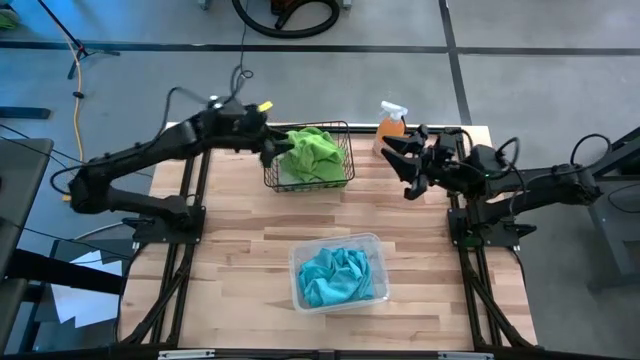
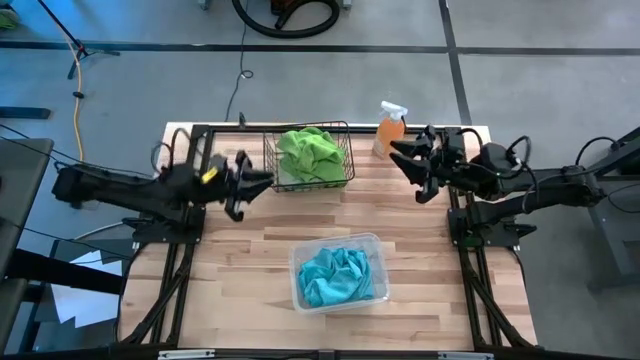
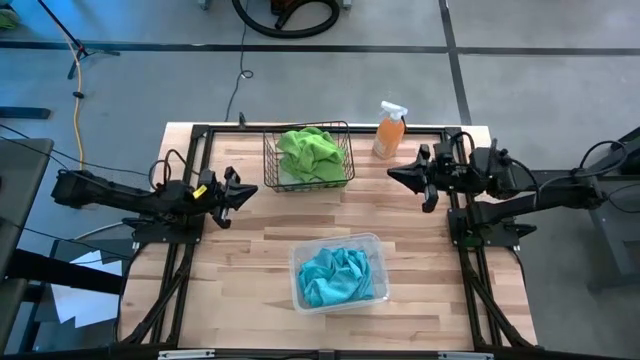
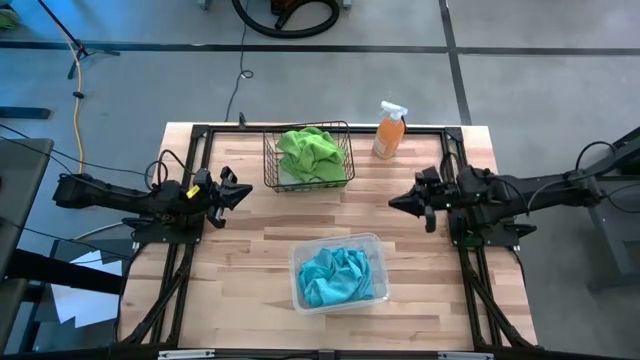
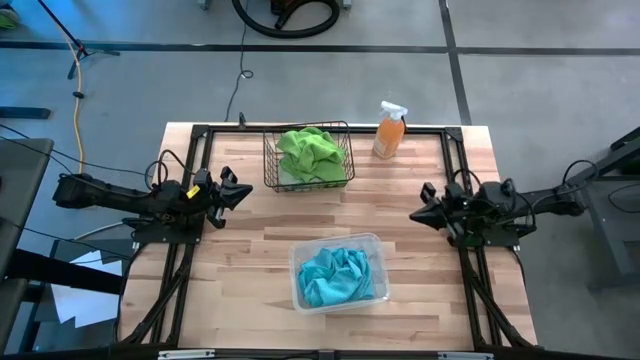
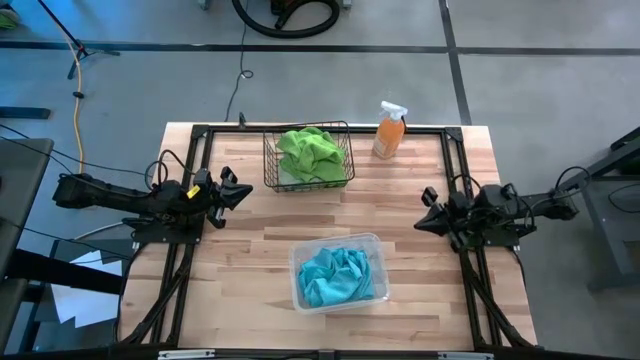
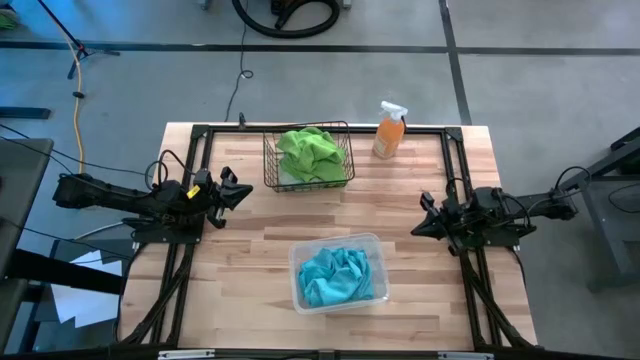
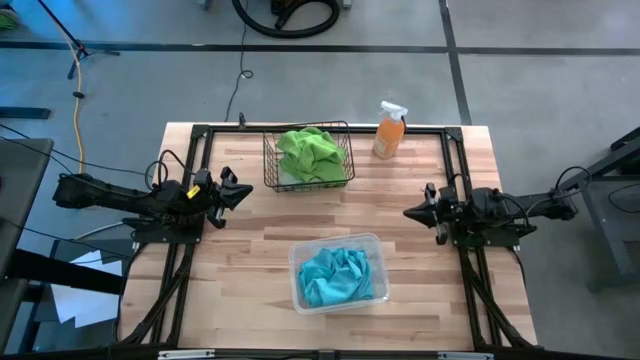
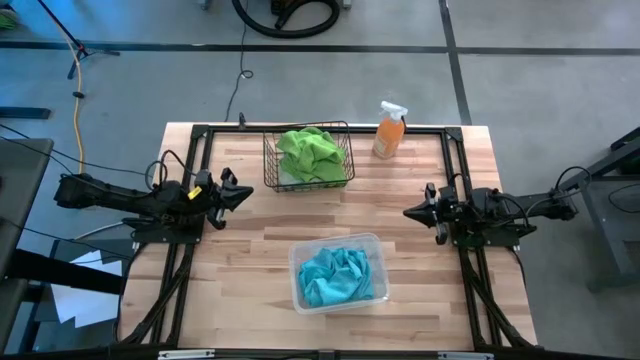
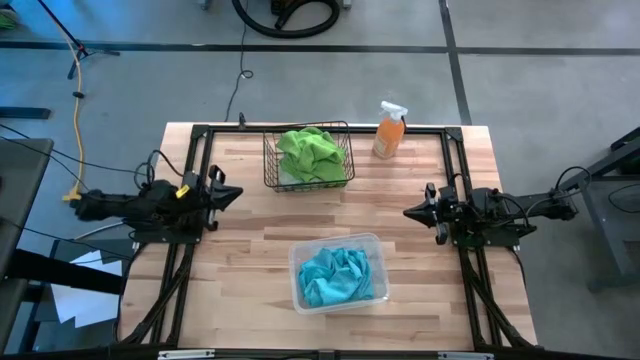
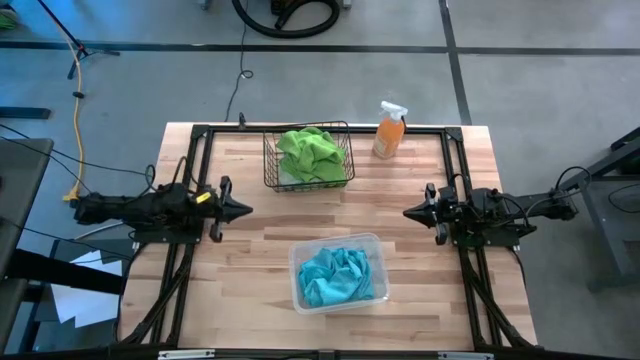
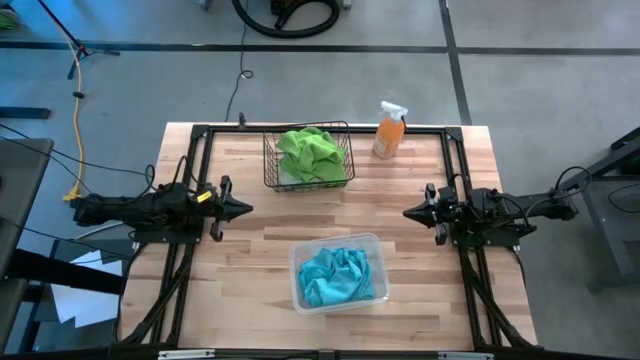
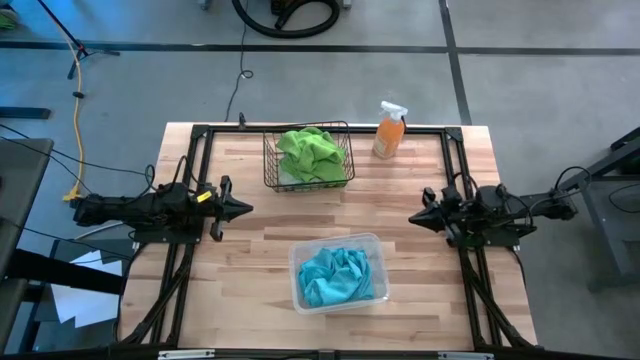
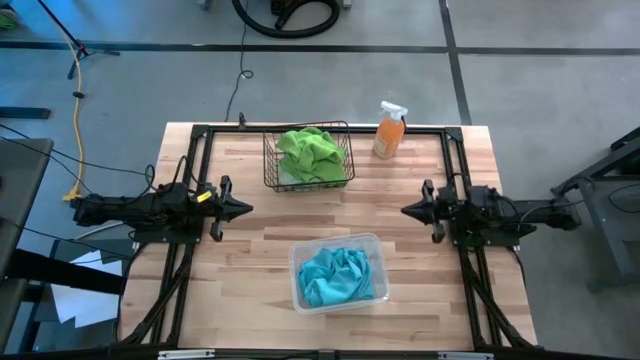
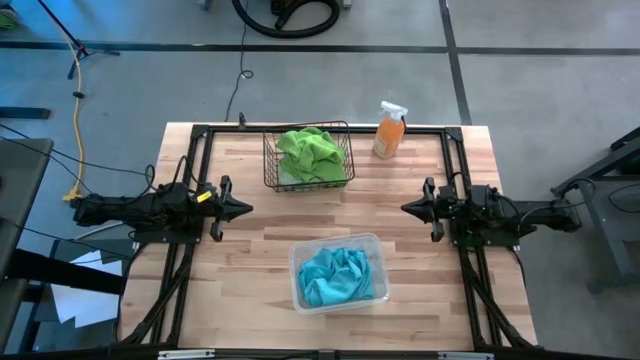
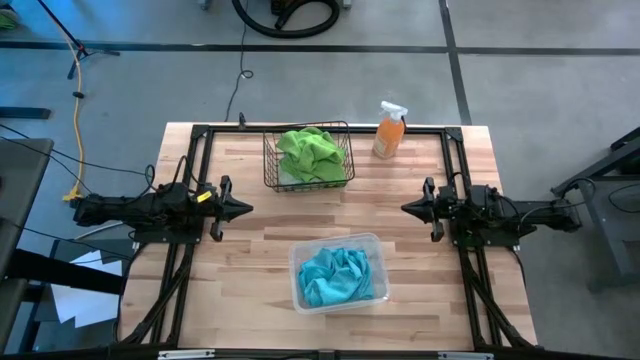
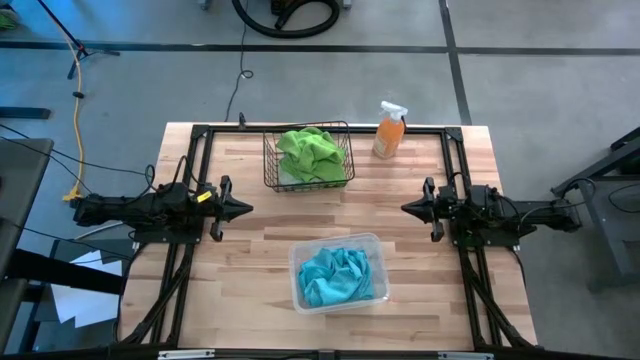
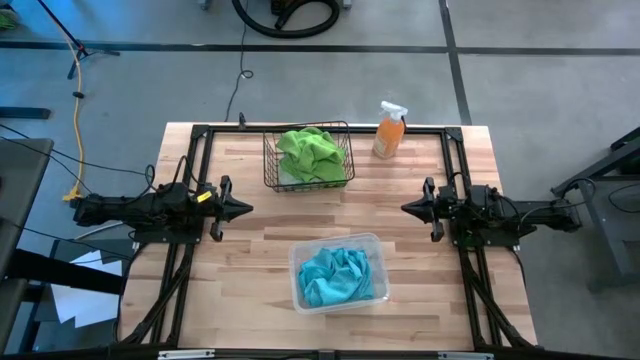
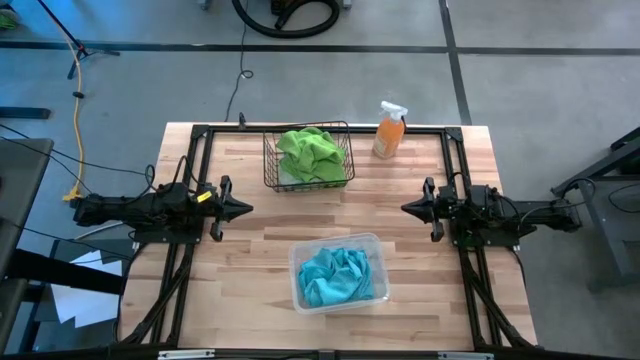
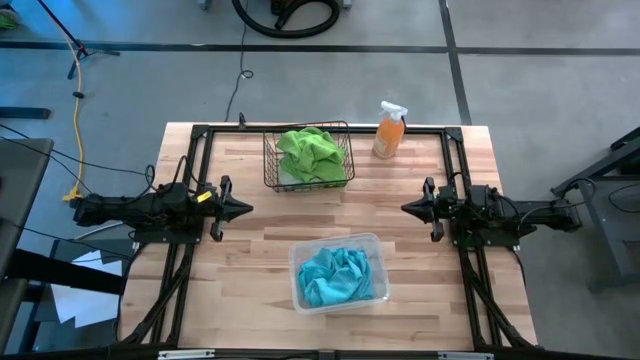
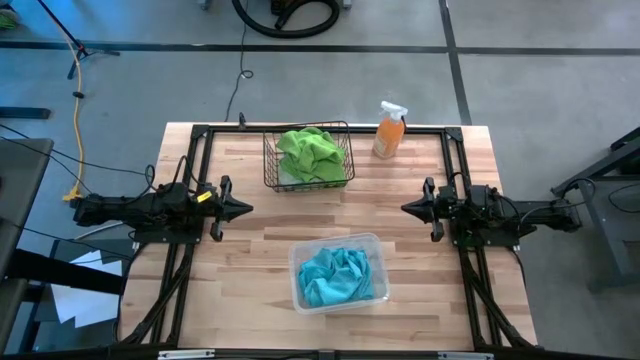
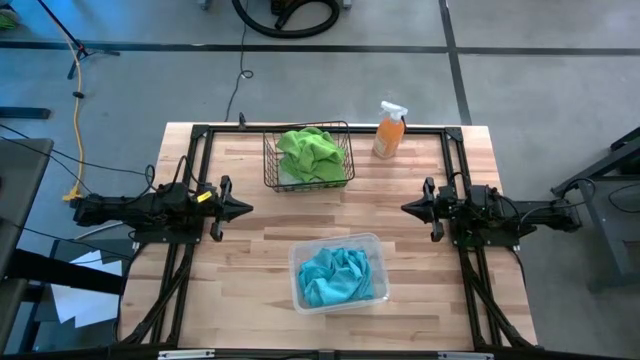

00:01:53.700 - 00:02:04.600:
Task: Sort microfiber towel by color & place in baskets
Return to Home Position

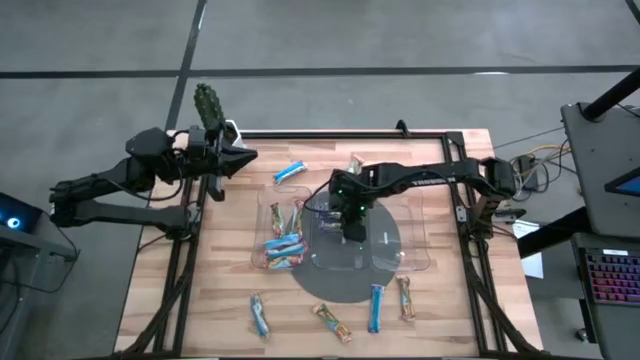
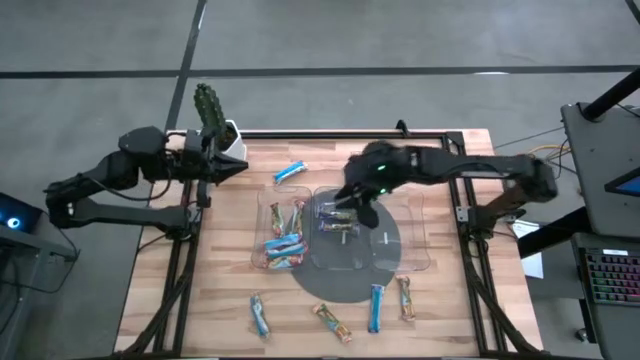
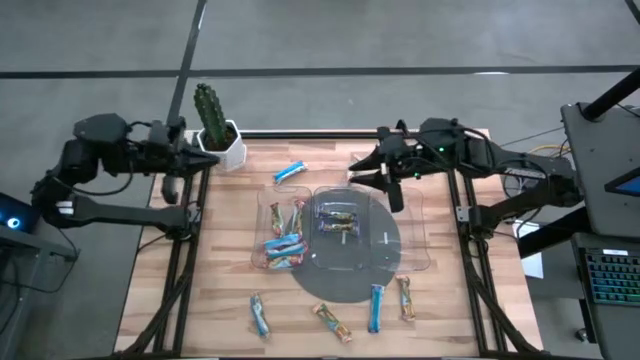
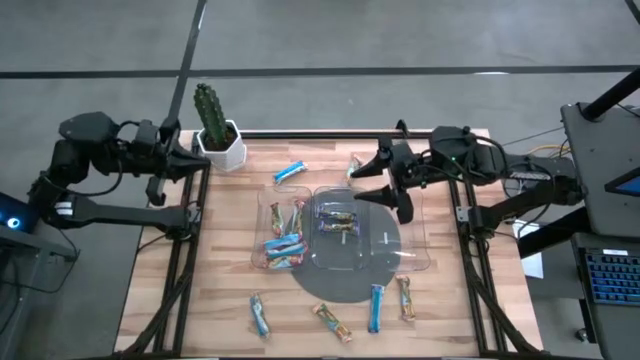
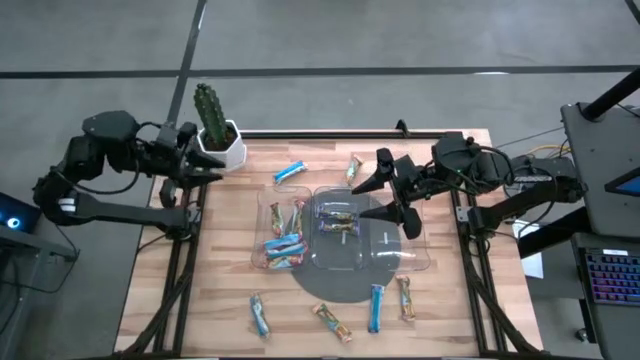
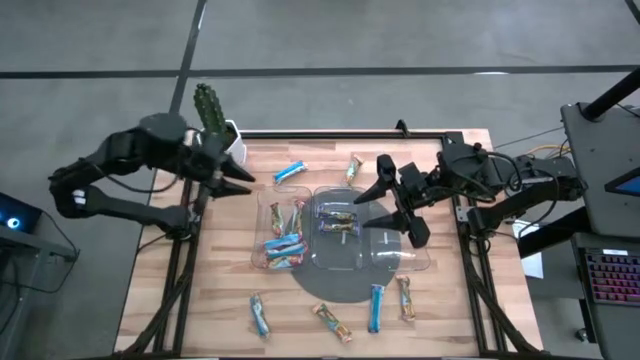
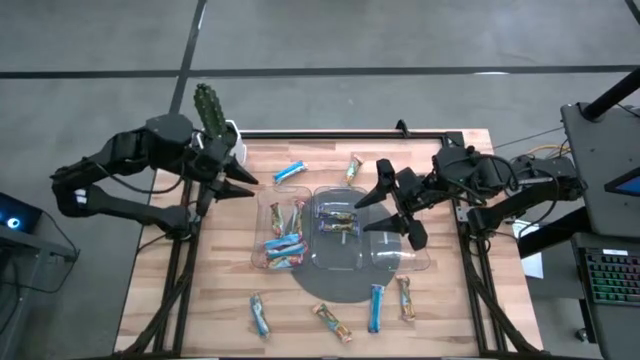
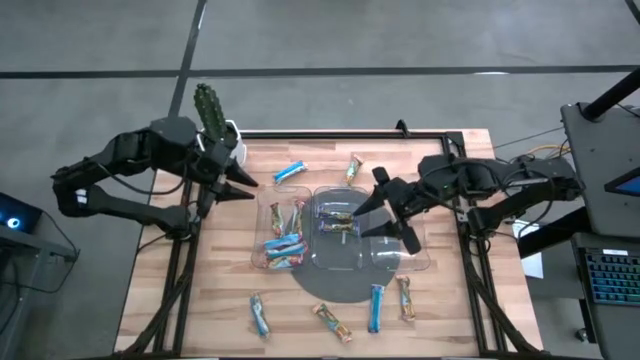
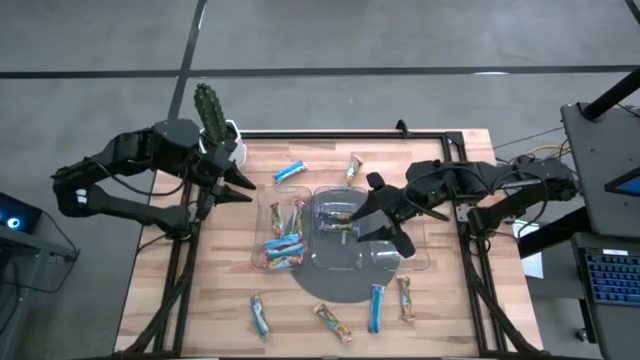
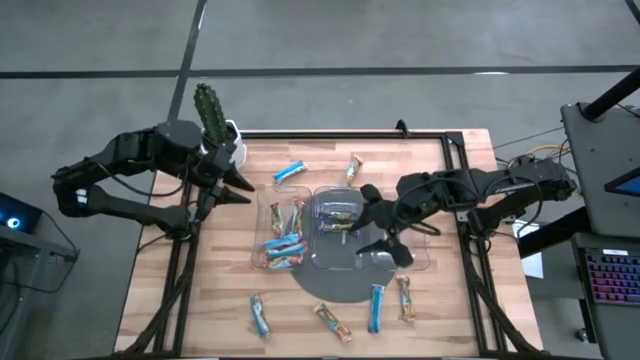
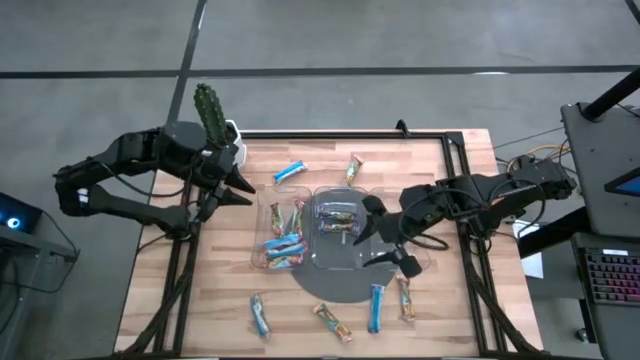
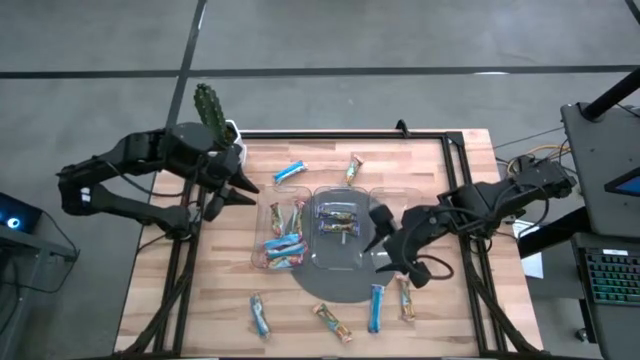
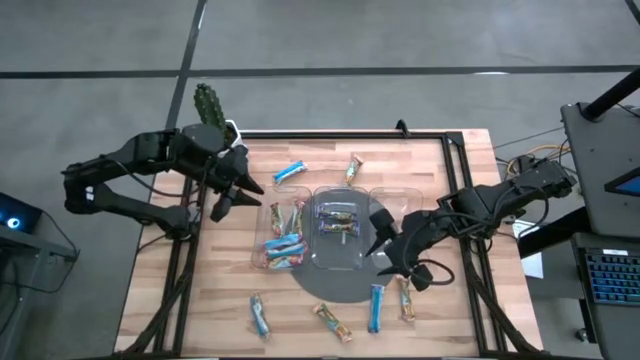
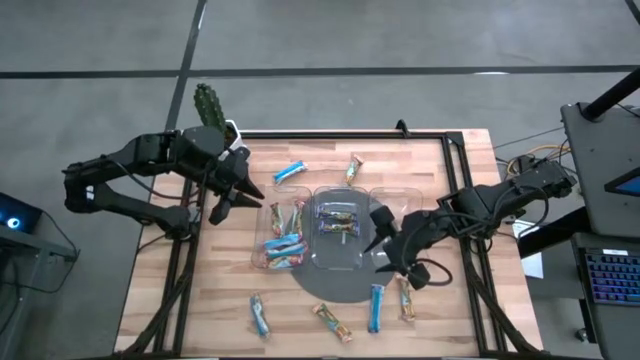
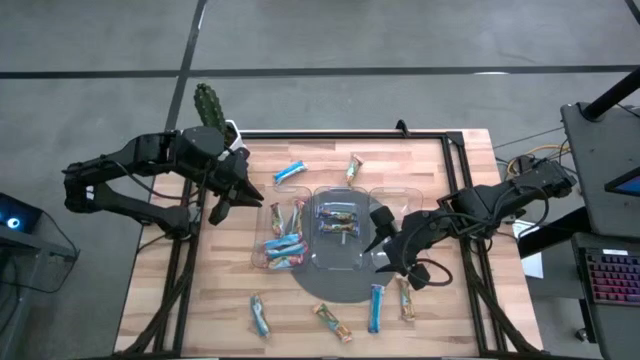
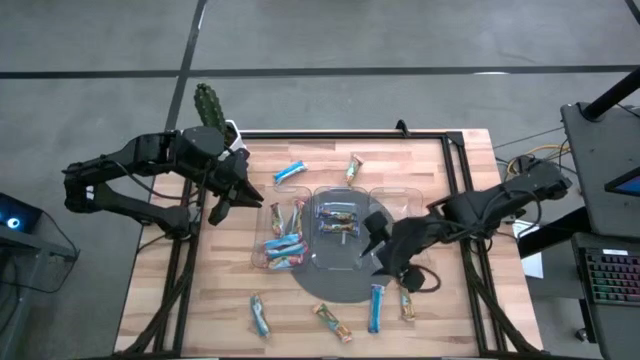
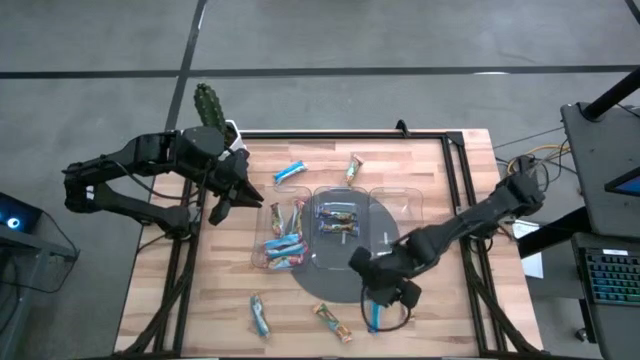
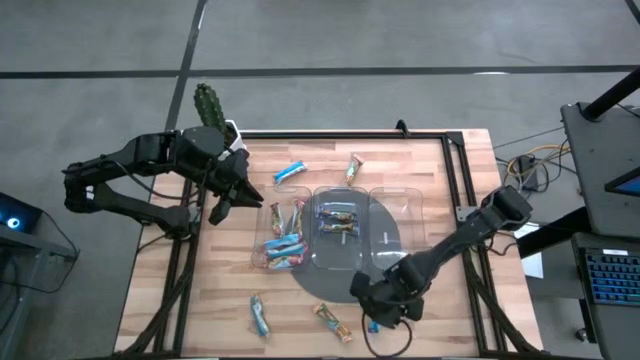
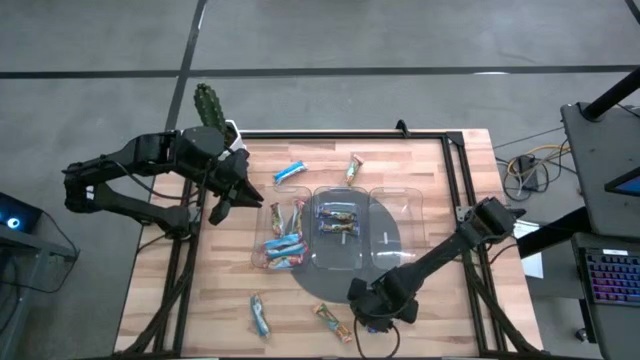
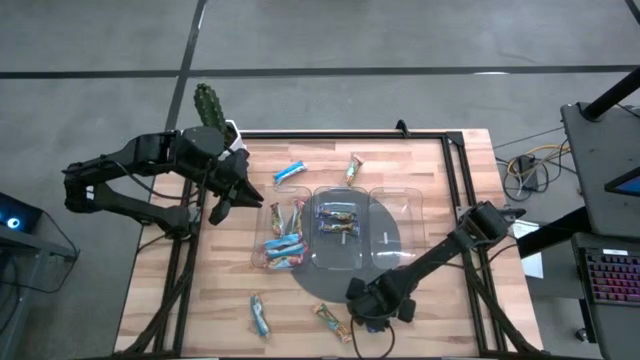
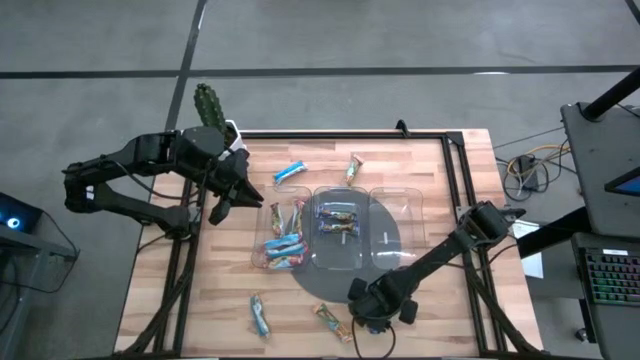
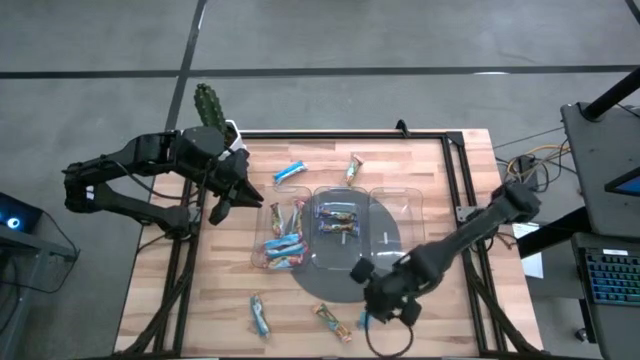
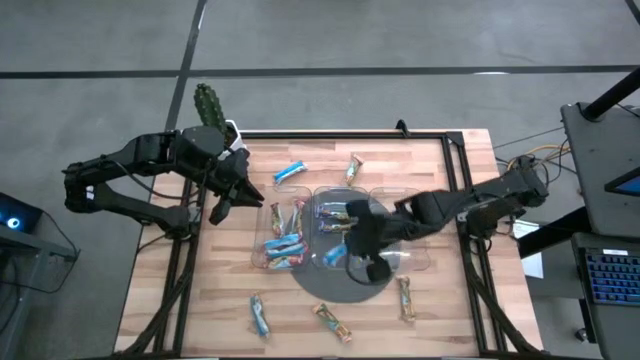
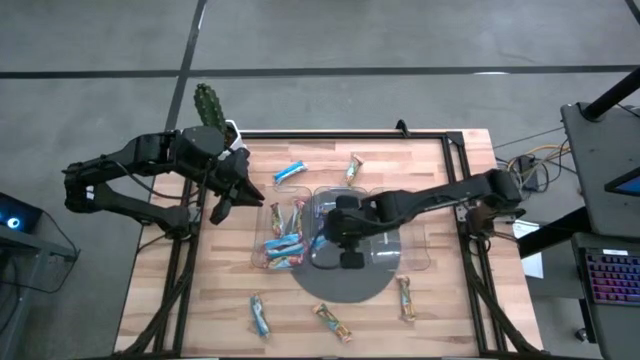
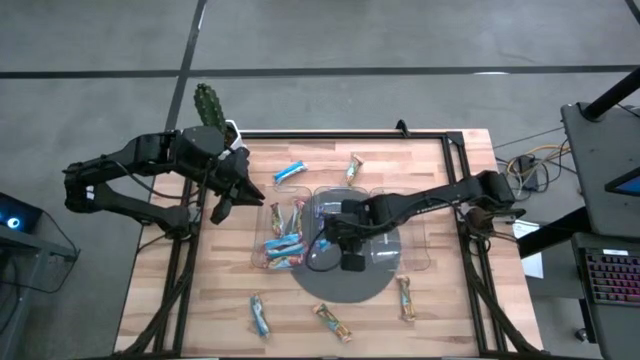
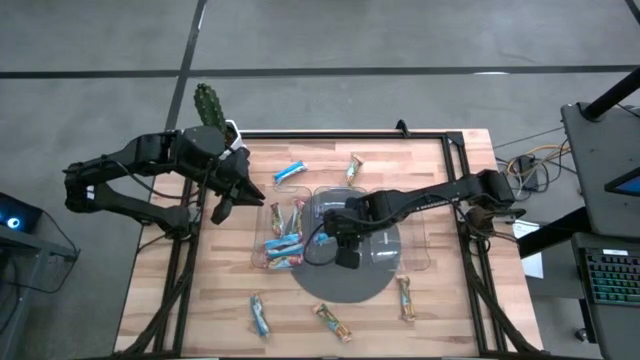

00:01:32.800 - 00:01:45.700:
Task: Pick and place Granola Bars by type
Put the blue granola bar into the middle transparent bin
